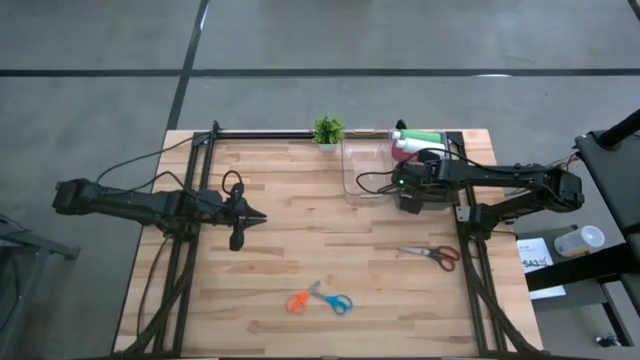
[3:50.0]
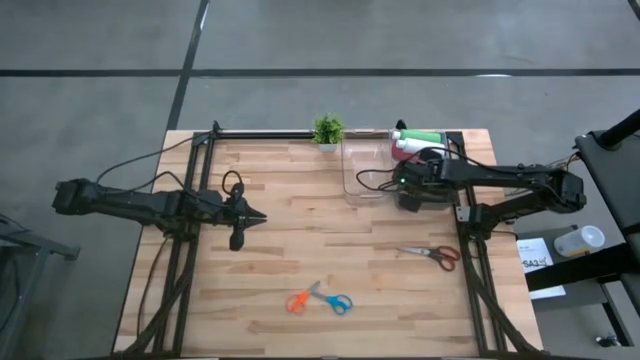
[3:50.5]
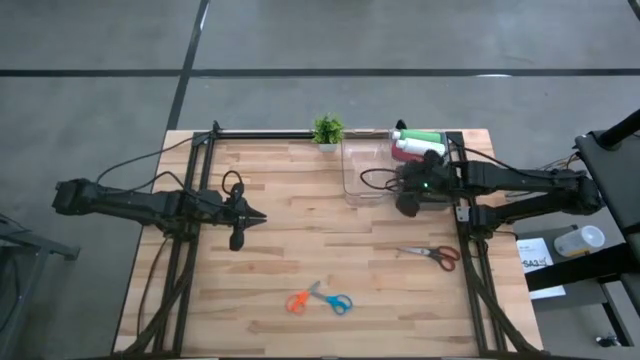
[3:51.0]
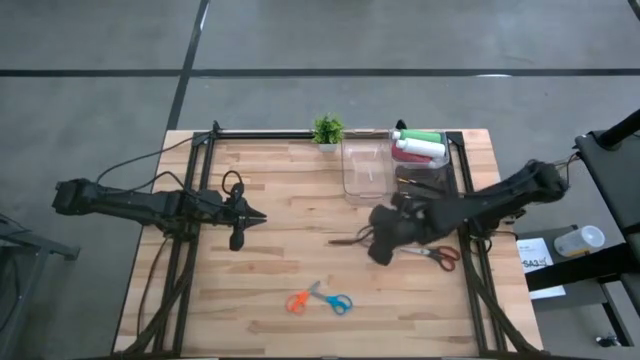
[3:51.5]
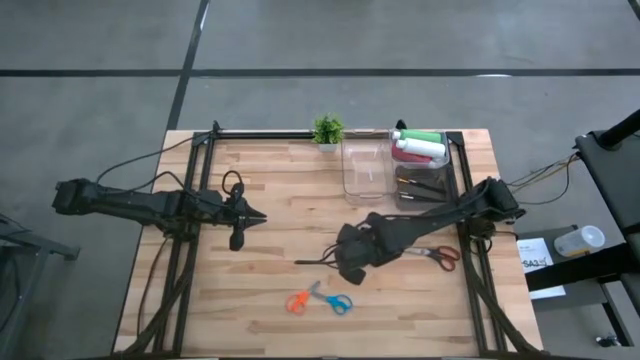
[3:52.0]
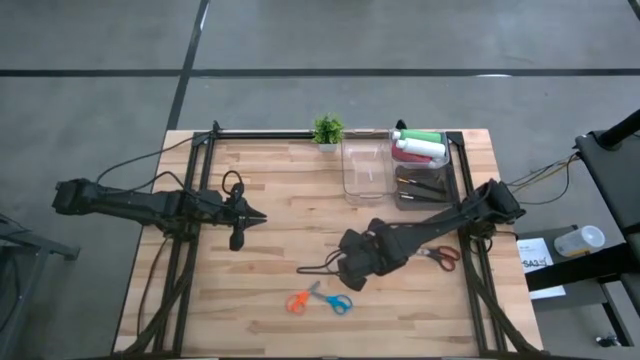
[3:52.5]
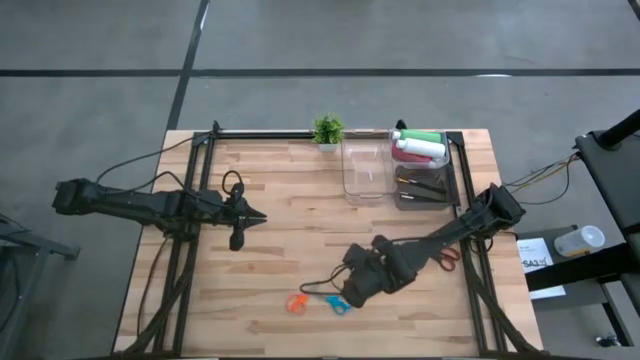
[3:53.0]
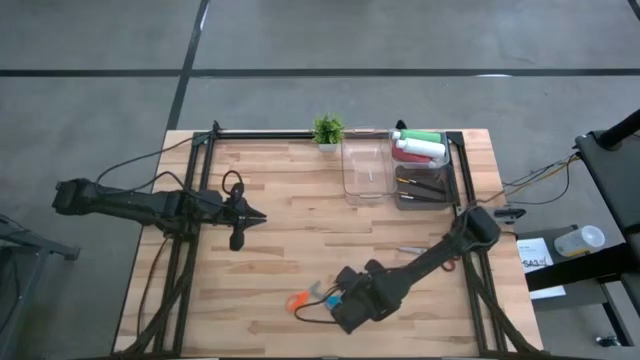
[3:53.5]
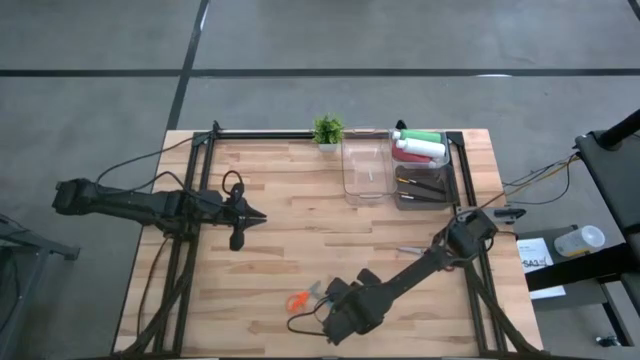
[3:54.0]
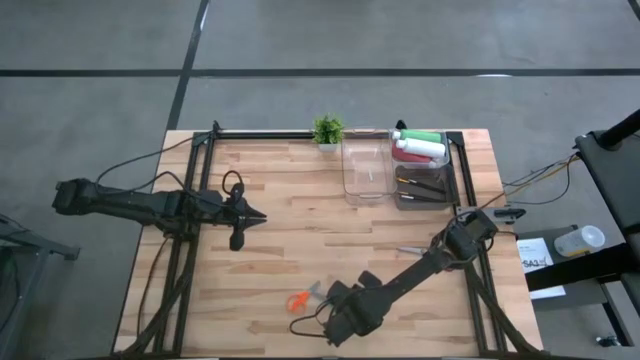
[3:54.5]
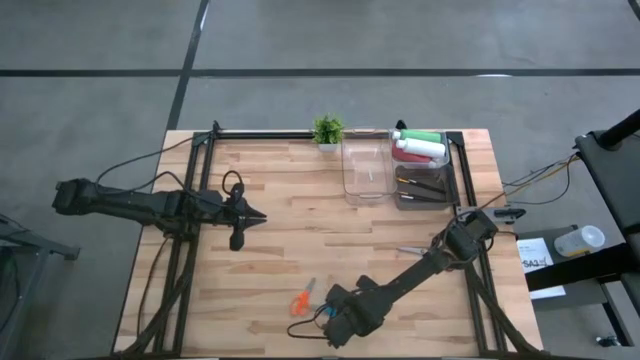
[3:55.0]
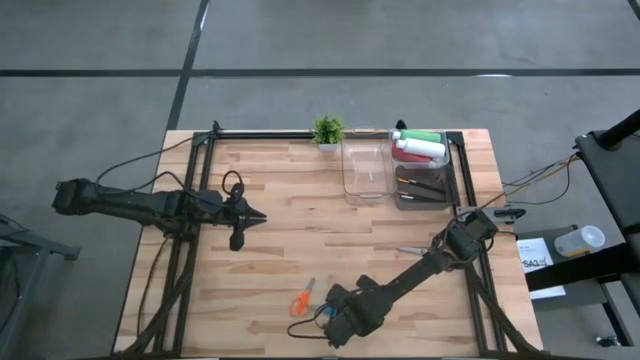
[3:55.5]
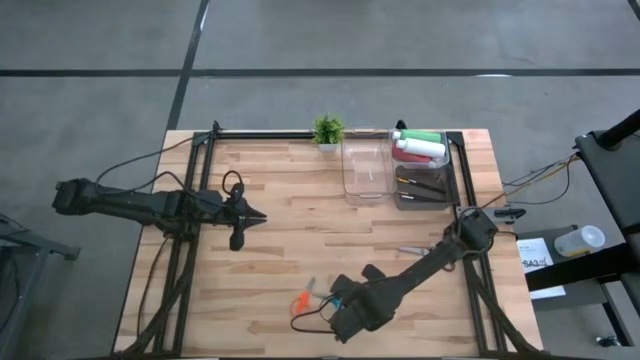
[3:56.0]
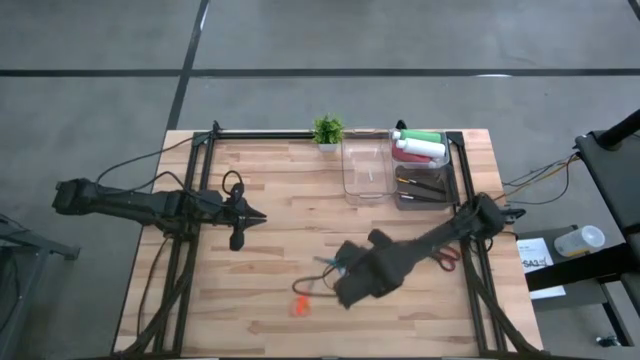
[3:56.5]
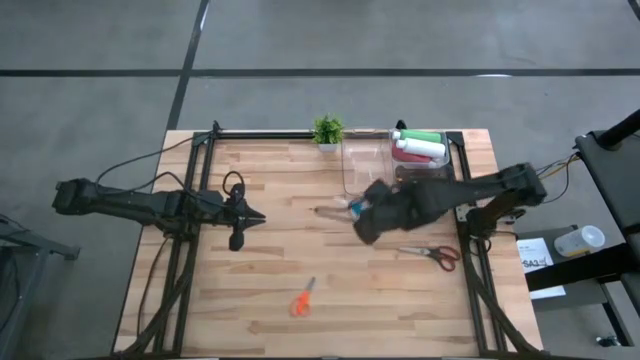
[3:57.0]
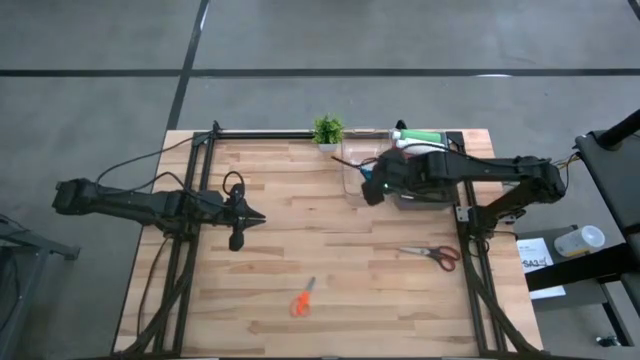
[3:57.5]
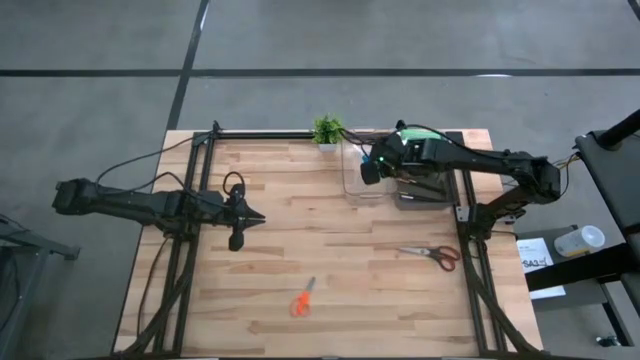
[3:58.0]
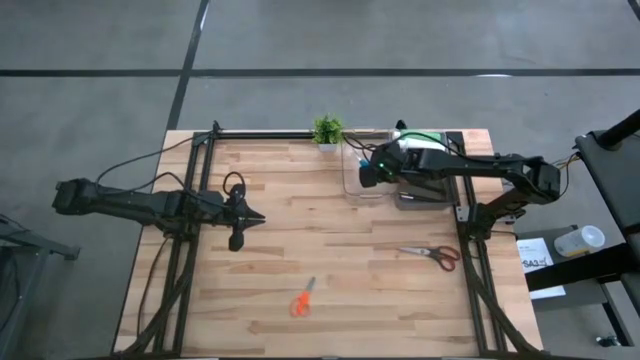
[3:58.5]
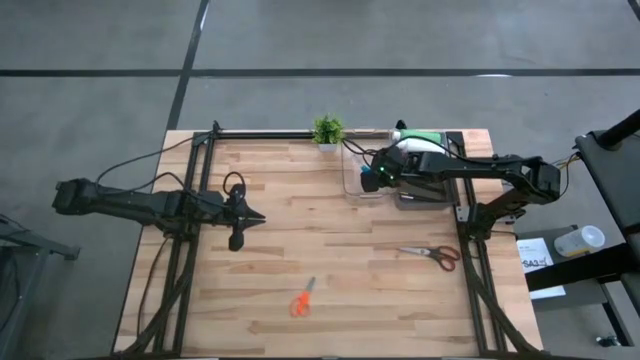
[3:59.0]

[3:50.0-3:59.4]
Task: Pick & Place Paint Supplies
Put the blue scissors into the left transparent bin

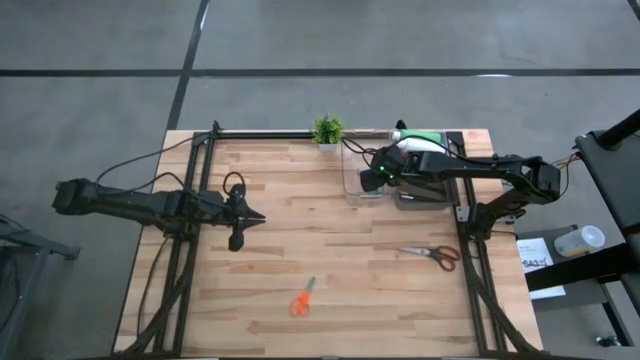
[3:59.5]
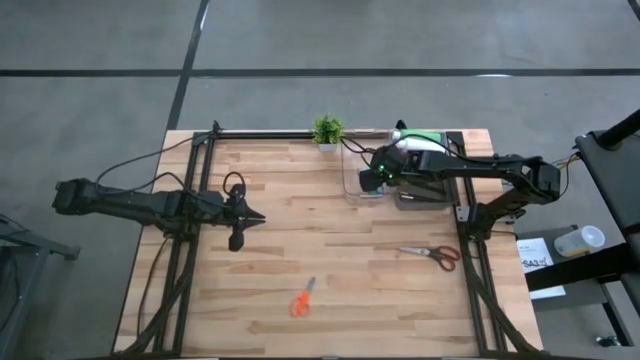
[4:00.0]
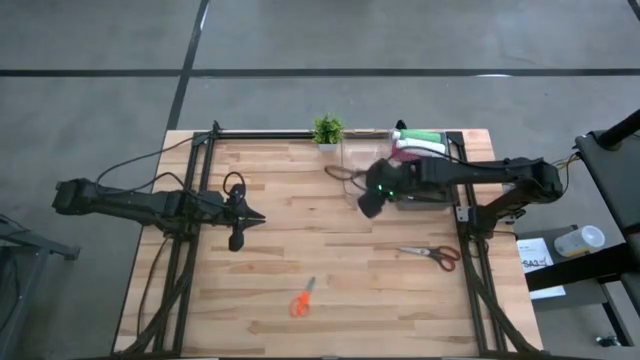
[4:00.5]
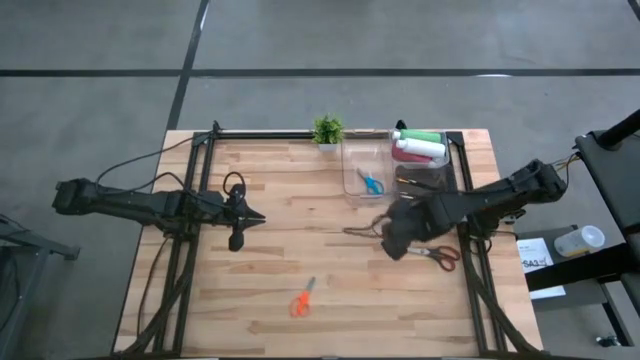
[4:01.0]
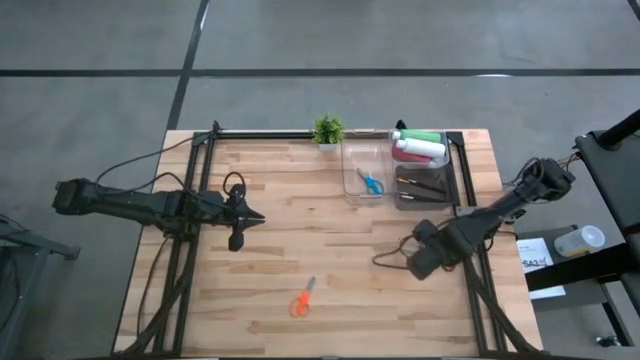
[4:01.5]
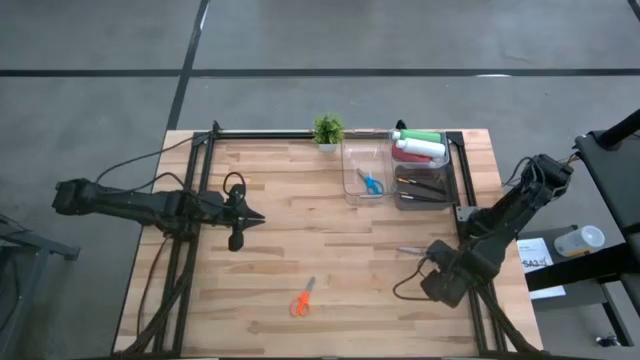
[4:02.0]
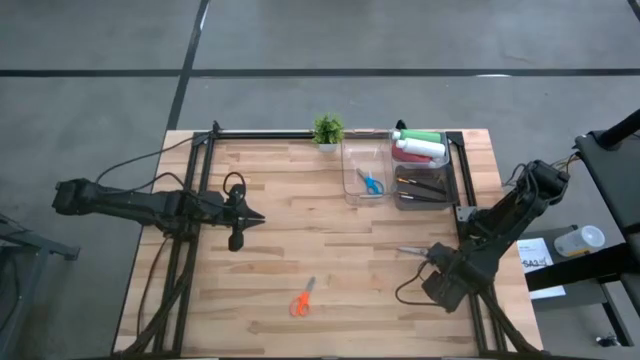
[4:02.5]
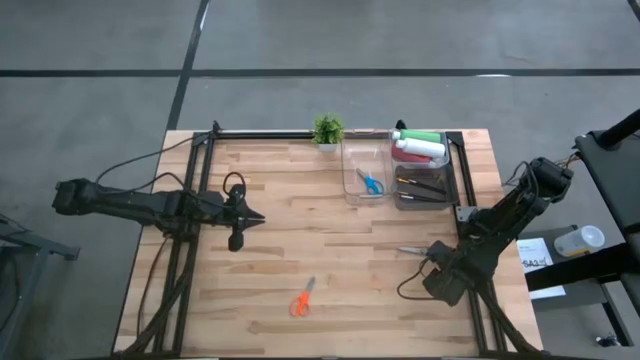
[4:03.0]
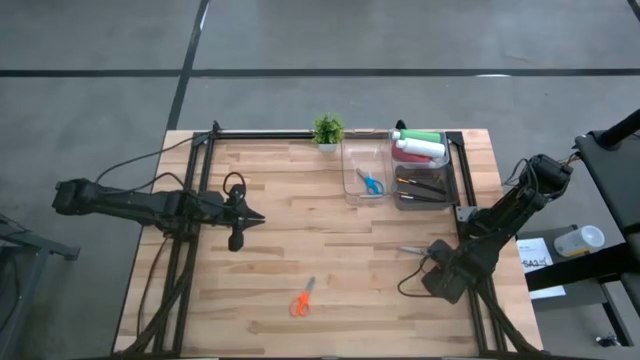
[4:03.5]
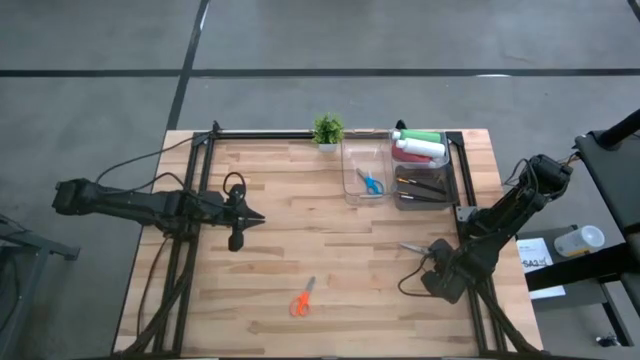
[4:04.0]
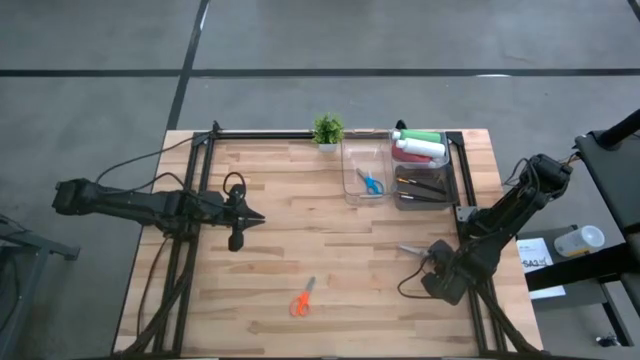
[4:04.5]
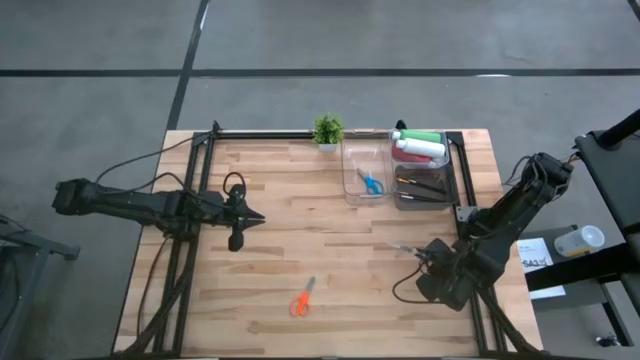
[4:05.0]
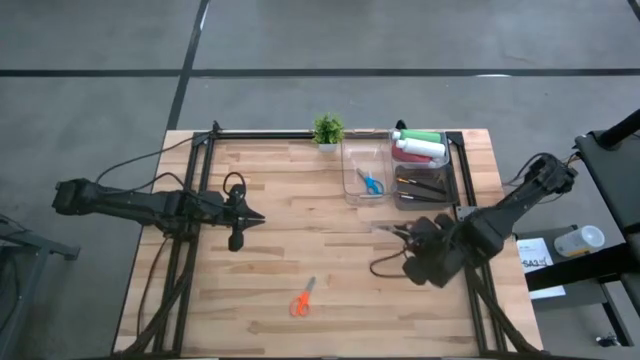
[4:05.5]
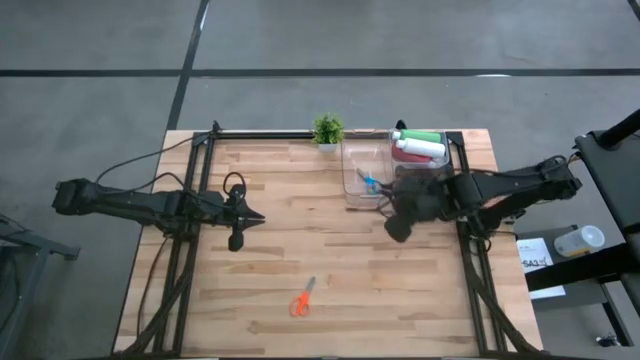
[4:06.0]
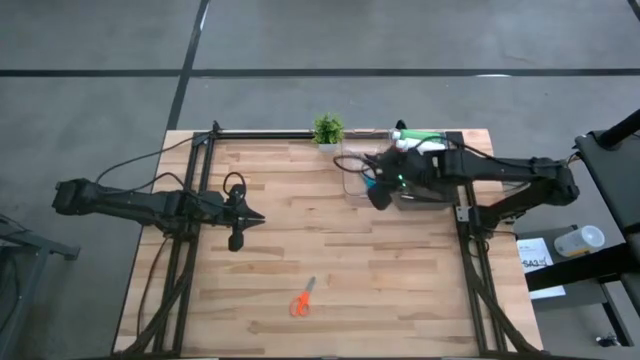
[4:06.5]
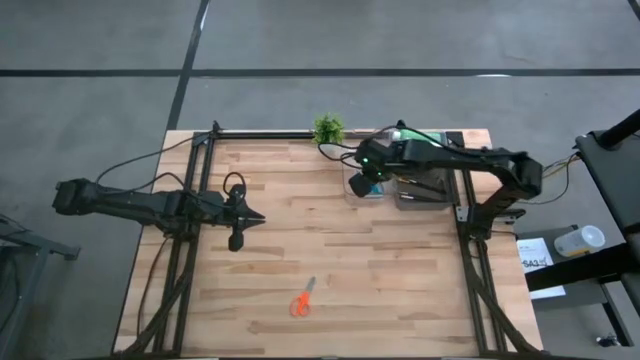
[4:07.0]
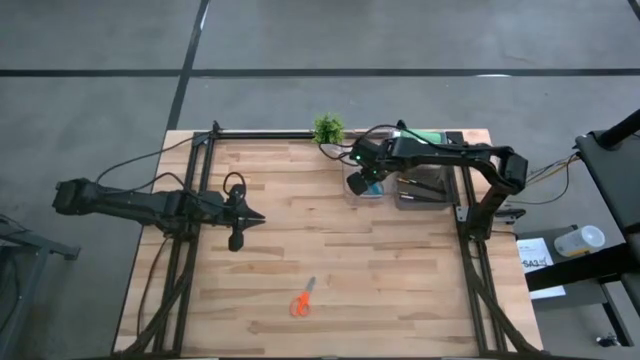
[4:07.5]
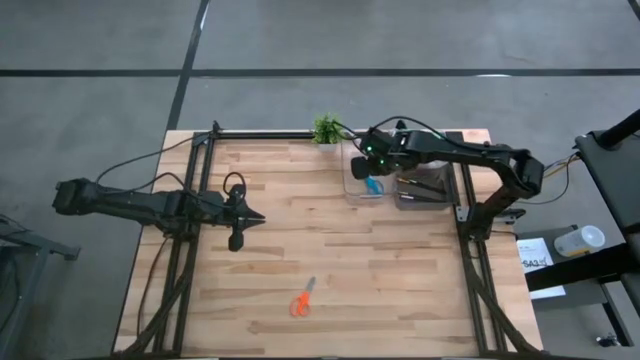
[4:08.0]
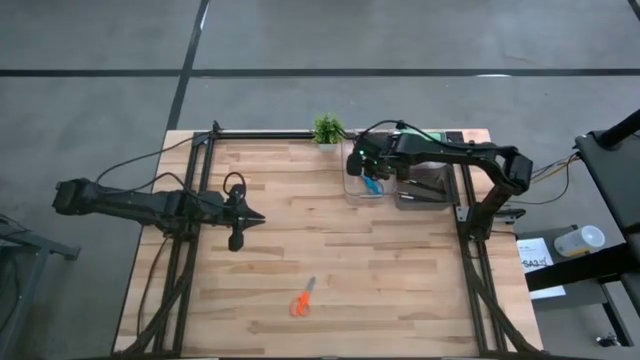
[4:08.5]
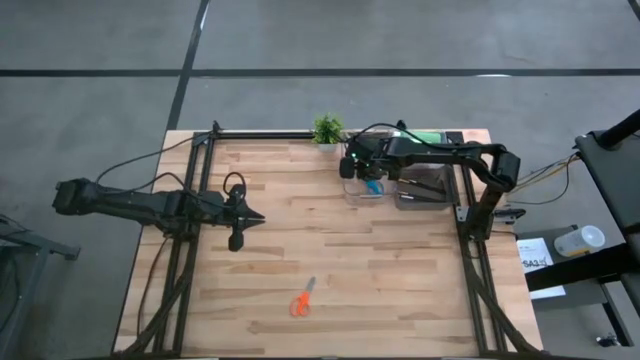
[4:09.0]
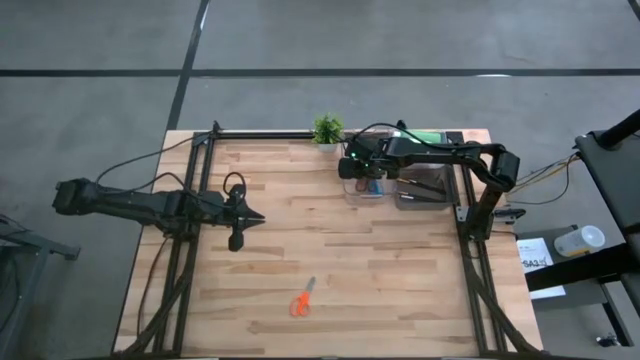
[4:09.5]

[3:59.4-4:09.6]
Put the black scissors into the left transparent bin

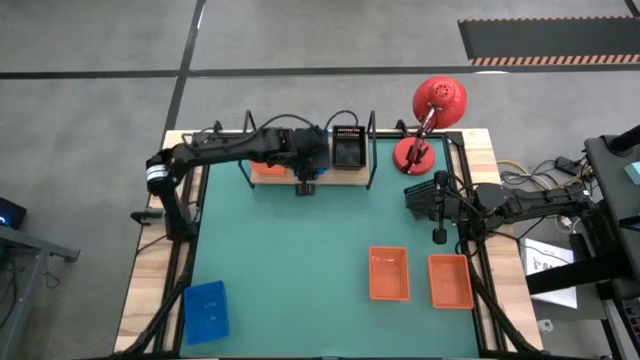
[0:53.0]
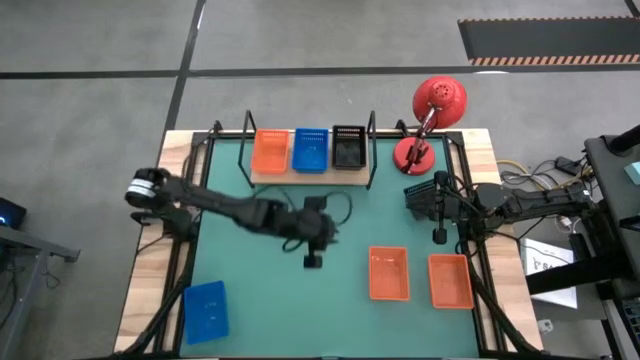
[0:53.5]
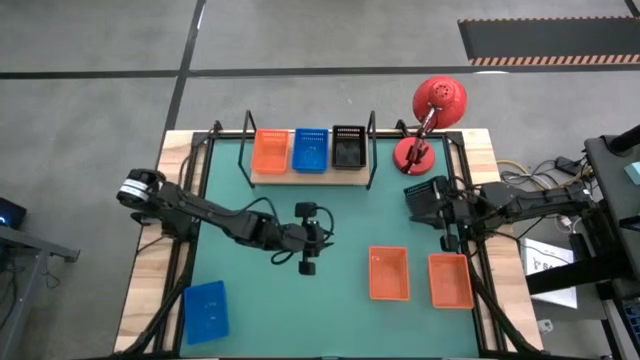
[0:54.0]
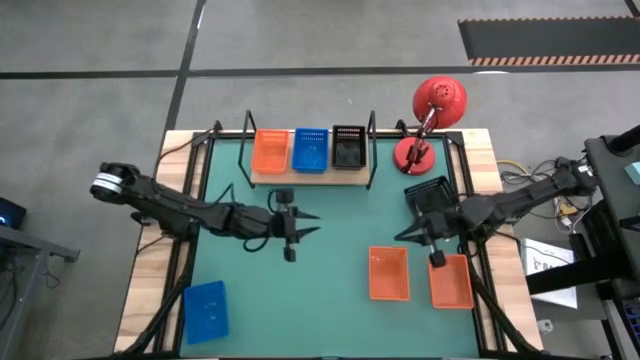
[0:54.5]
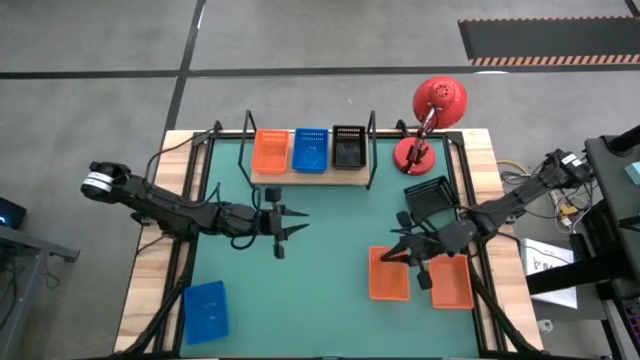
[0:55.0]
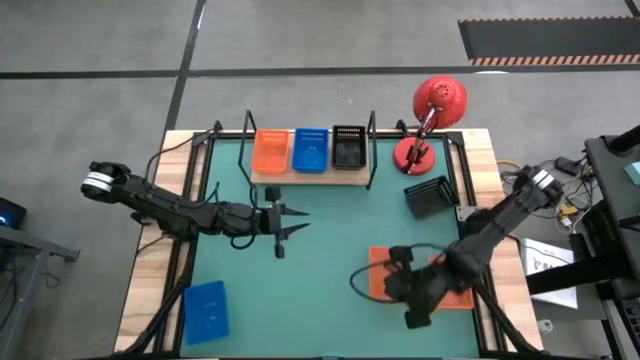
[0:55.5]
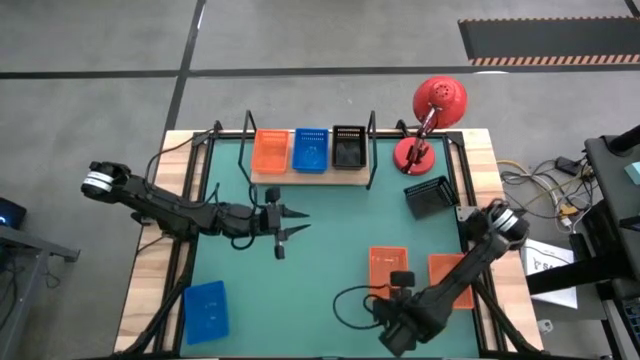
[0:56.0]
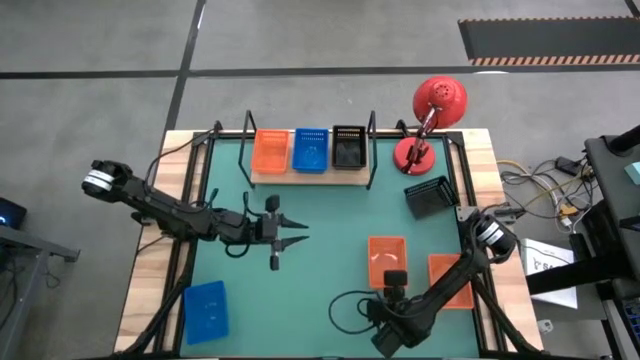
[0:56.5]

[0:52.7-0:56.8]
Task: Stack baskets on shelf by color
Stack the left orange basket on top of the orange basket on the shelf
